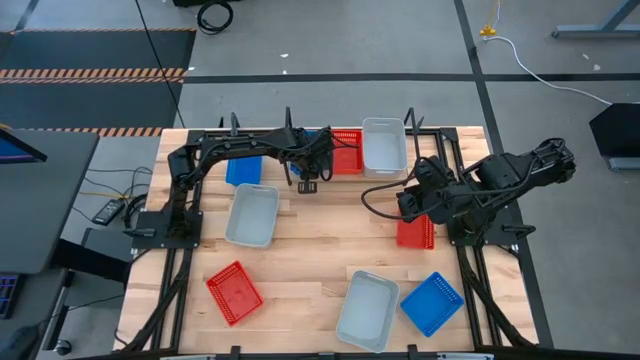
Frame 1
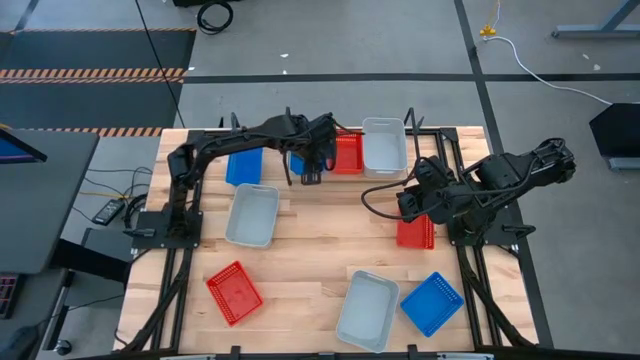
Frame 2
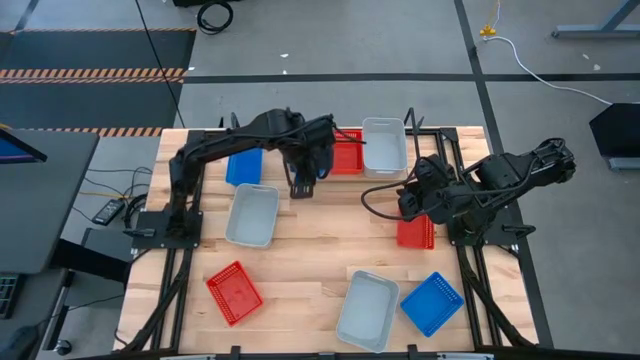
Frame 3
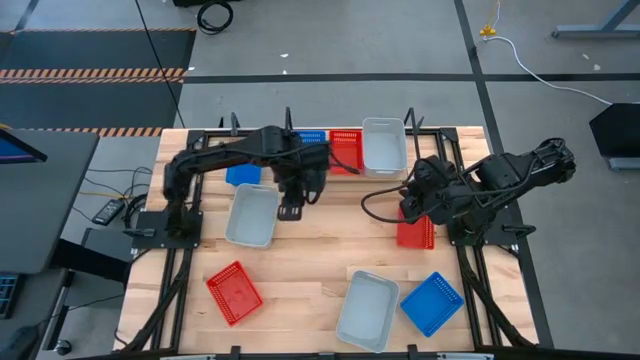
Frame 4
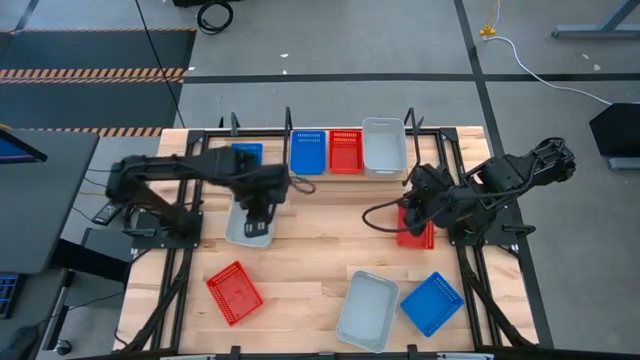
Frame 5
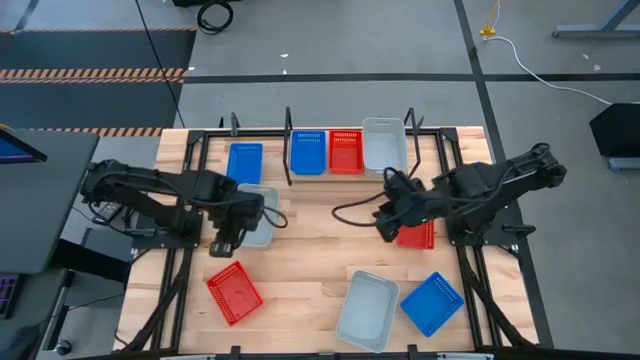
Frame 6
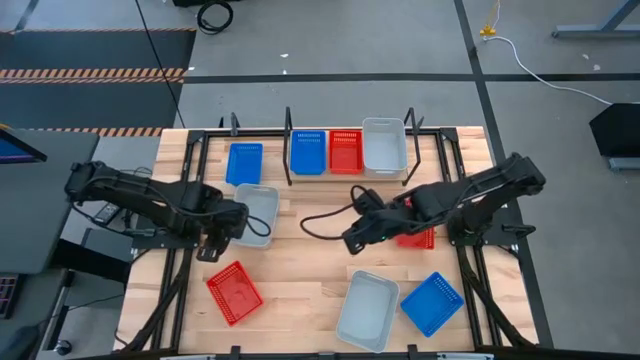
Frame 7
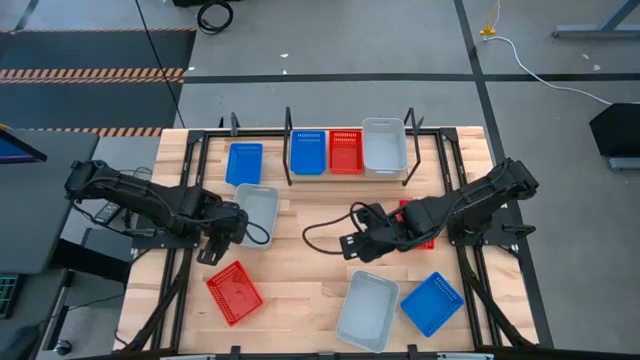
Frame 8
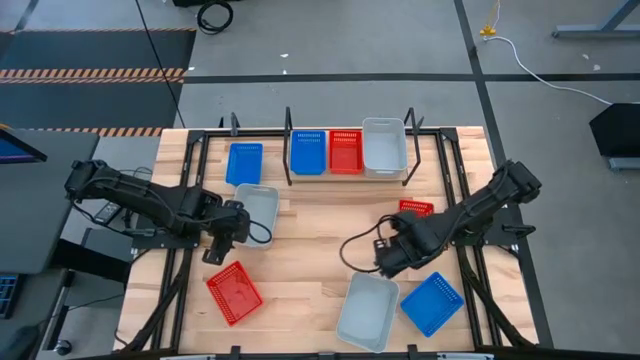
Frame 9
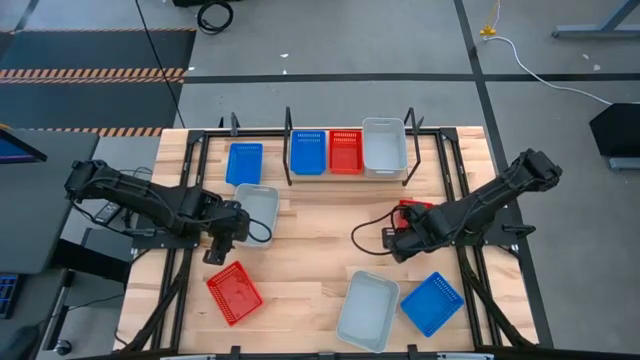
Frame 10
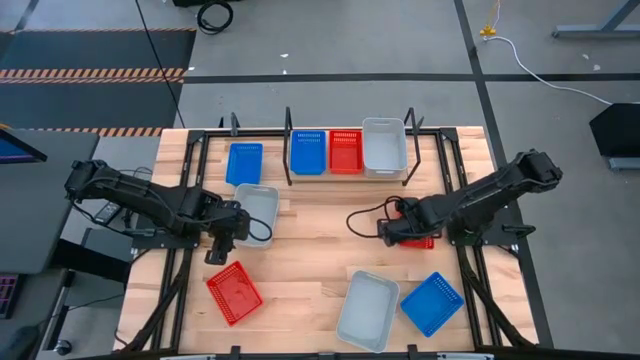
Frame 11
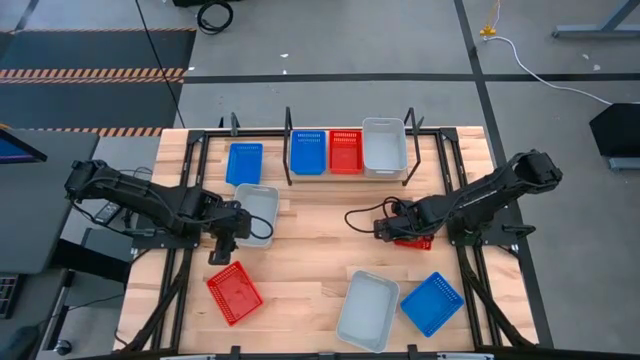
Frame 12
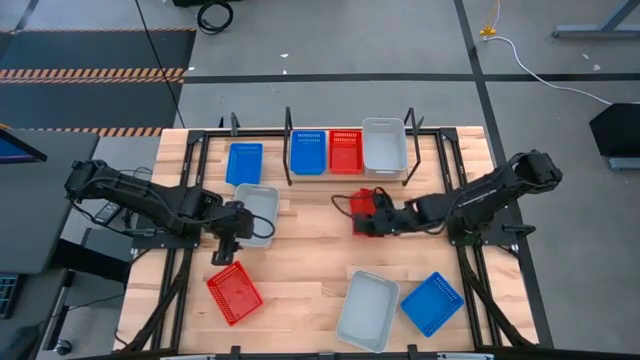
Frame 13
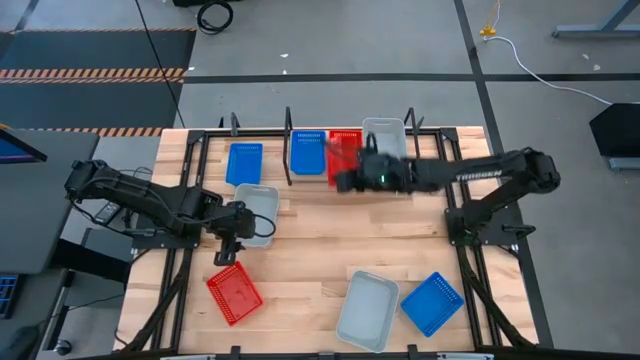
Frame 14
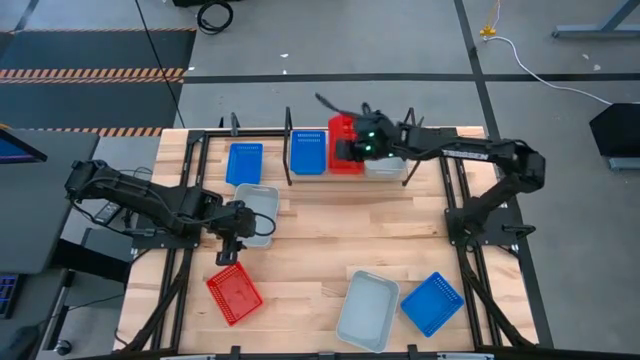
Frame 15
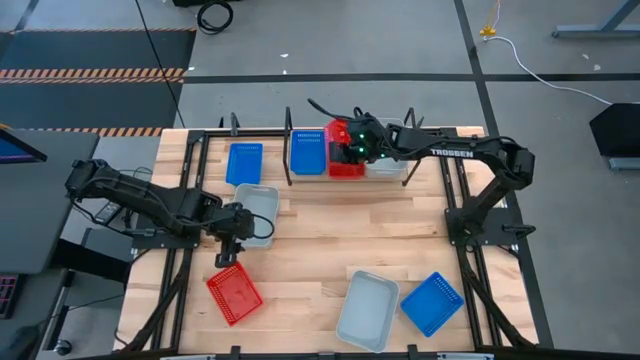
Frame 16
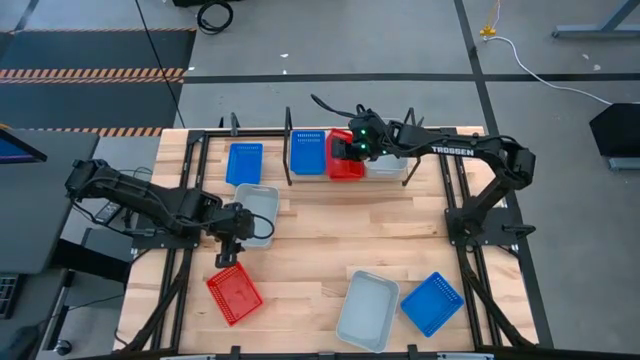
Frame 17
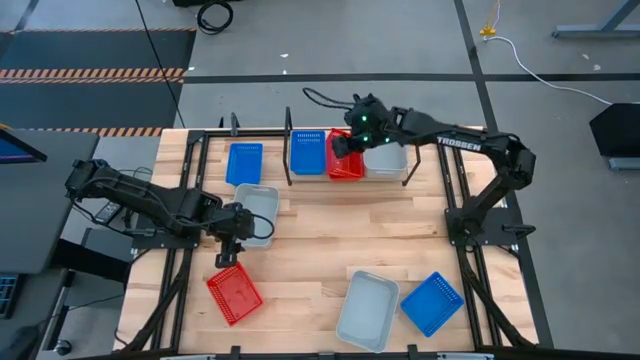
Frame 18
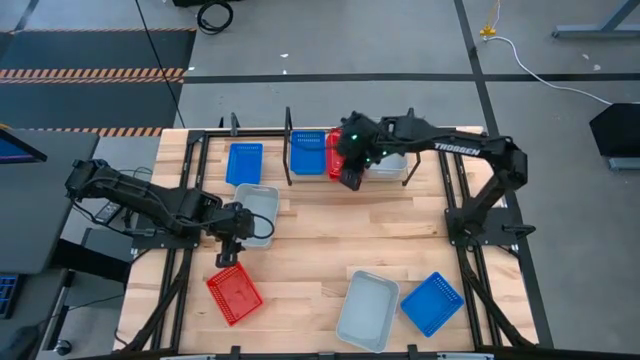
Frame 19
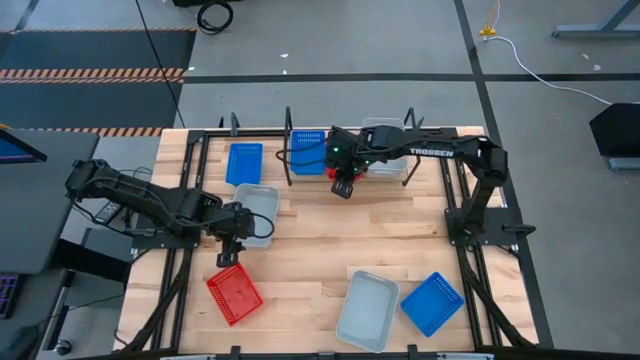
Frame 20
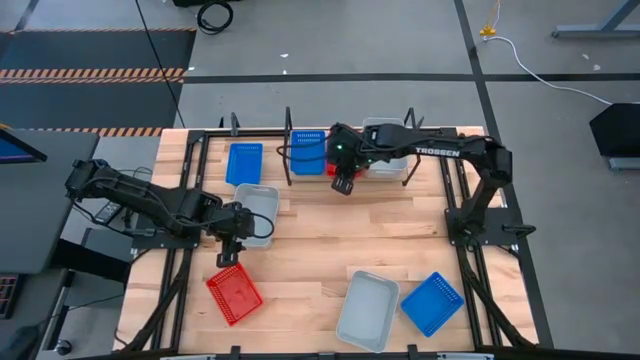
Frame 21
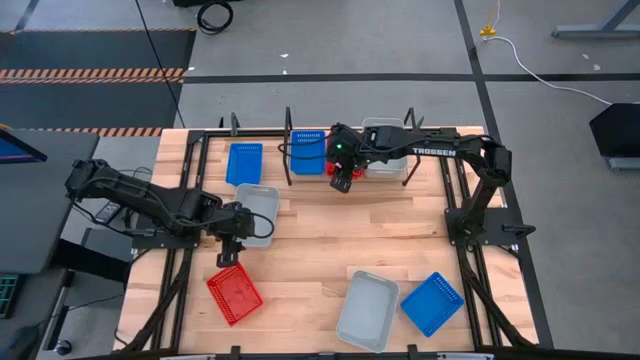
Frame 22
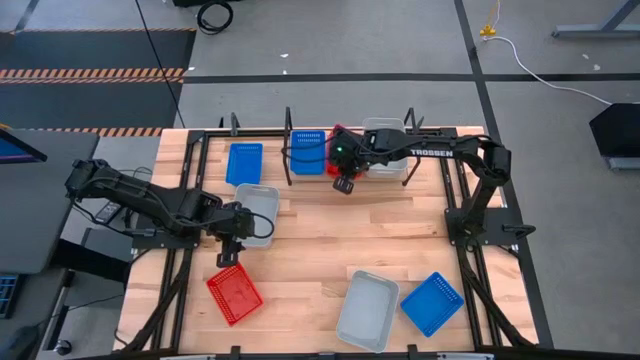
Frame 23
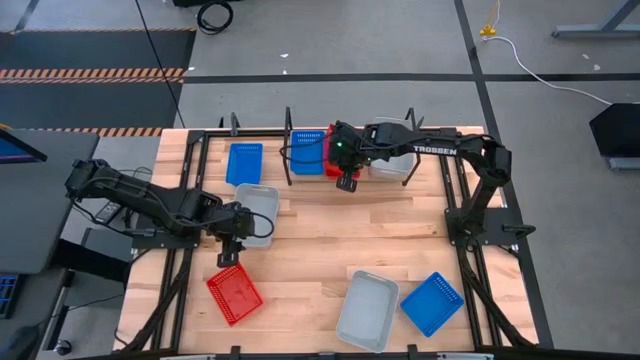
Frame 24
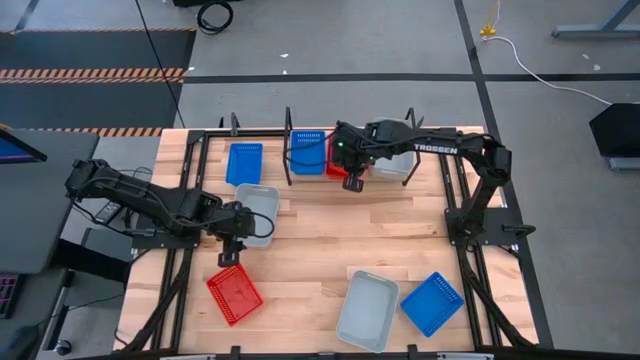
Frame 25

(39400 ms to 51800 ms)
Task: Stack baskets on shelf by color
Stack the right red bin on the red bin on the shelf
